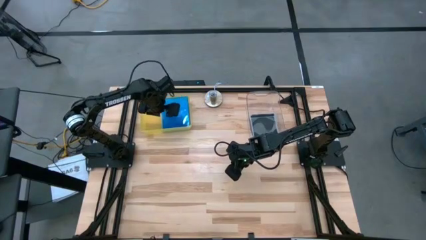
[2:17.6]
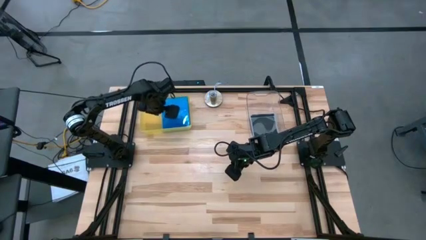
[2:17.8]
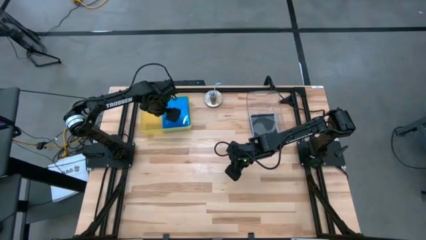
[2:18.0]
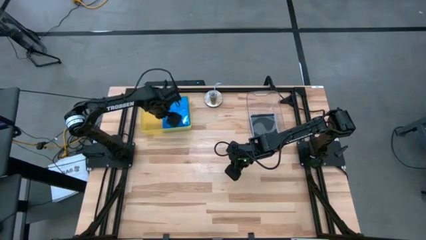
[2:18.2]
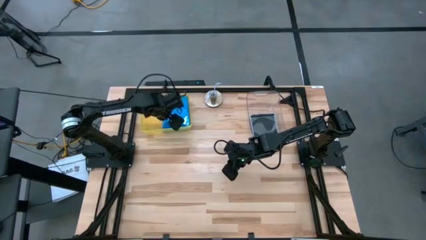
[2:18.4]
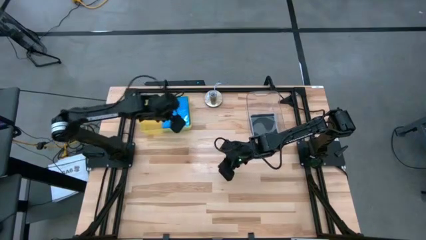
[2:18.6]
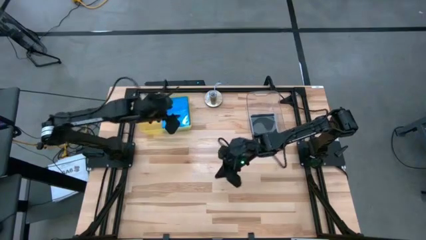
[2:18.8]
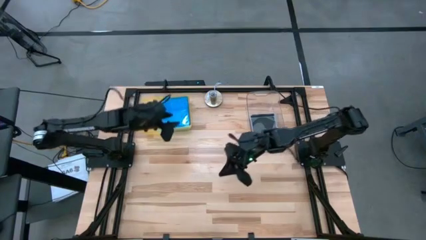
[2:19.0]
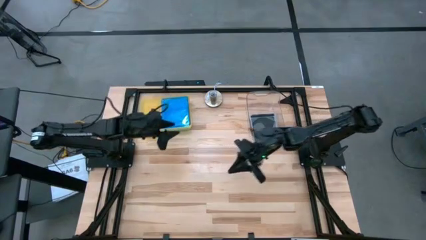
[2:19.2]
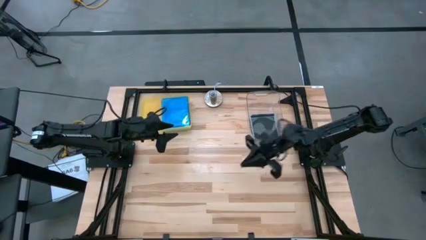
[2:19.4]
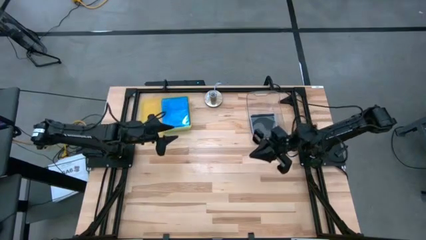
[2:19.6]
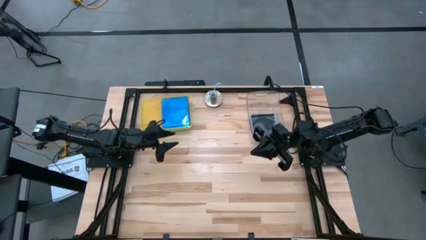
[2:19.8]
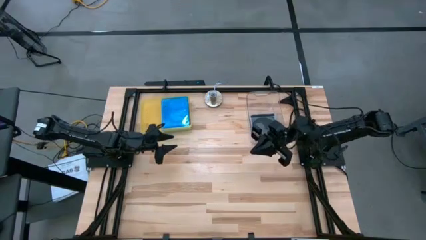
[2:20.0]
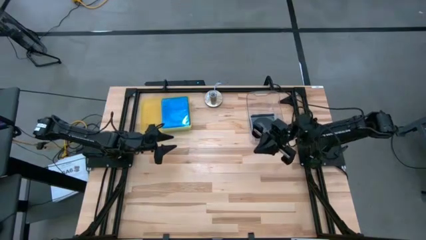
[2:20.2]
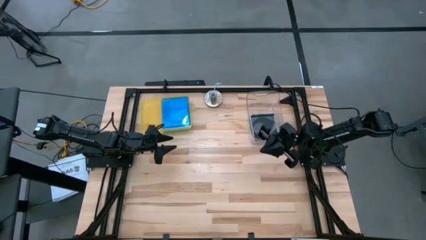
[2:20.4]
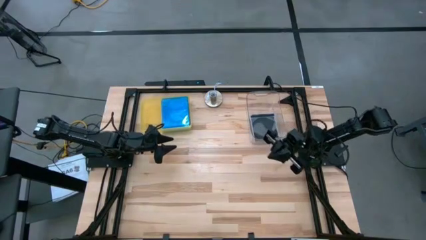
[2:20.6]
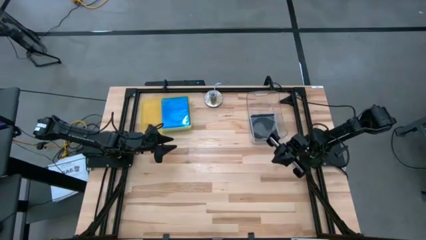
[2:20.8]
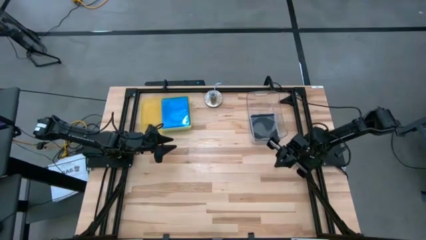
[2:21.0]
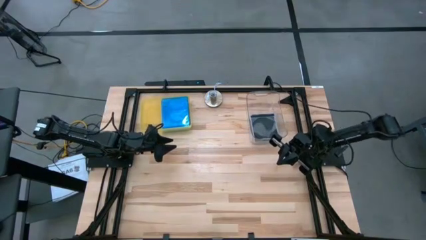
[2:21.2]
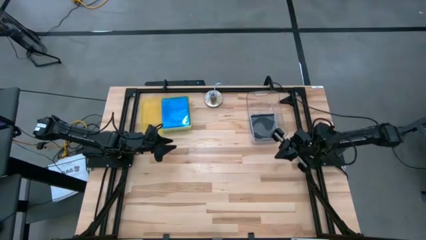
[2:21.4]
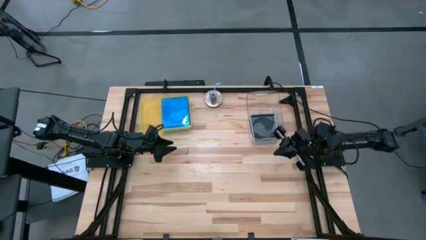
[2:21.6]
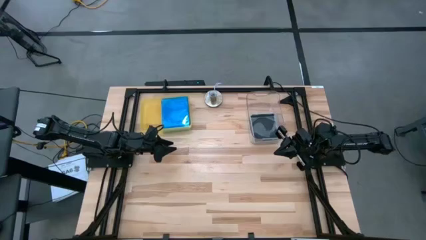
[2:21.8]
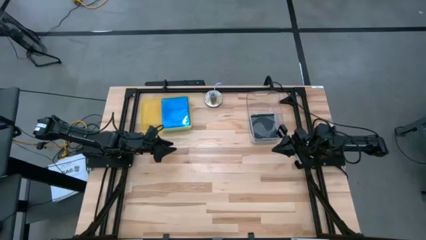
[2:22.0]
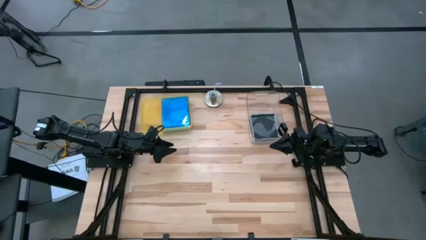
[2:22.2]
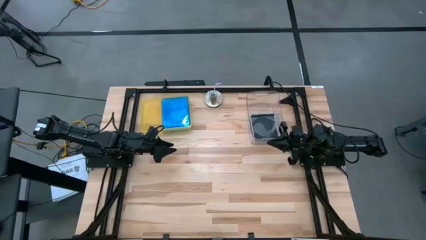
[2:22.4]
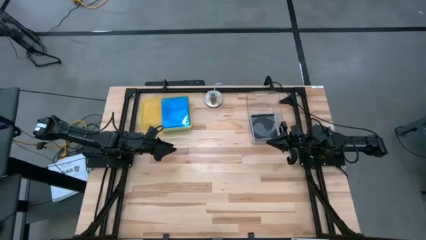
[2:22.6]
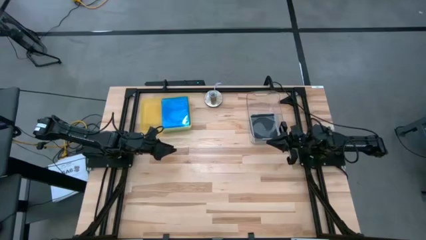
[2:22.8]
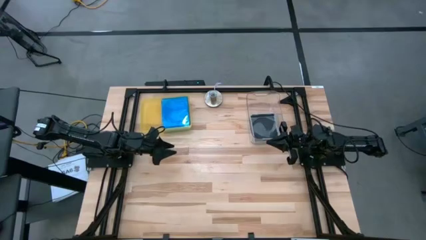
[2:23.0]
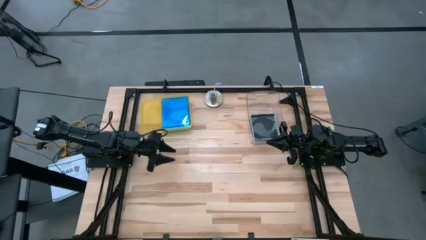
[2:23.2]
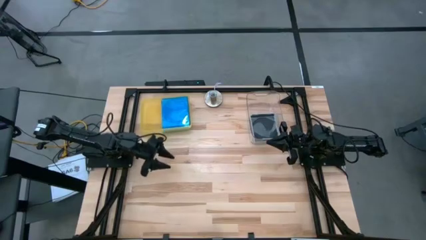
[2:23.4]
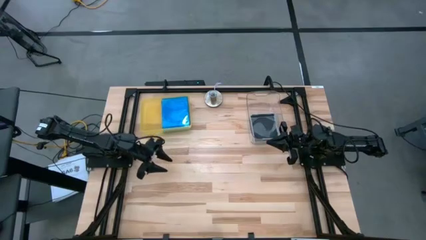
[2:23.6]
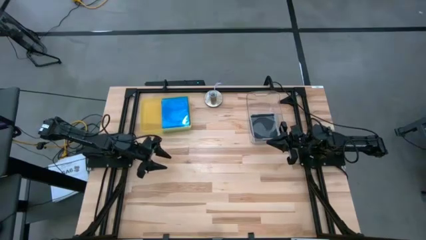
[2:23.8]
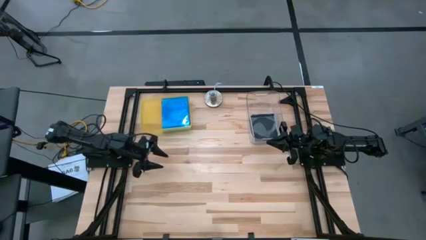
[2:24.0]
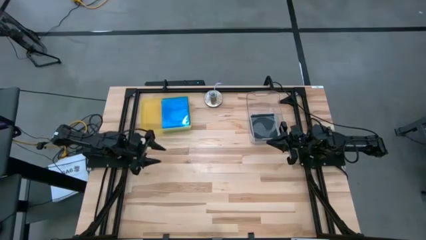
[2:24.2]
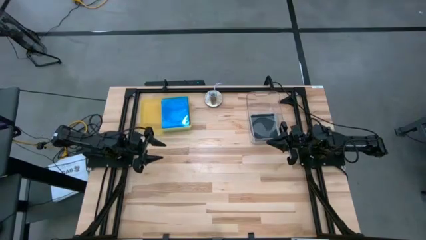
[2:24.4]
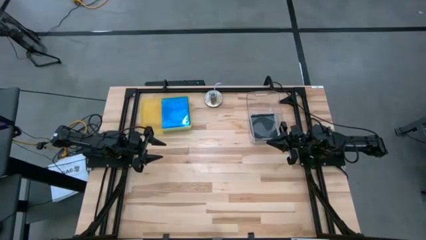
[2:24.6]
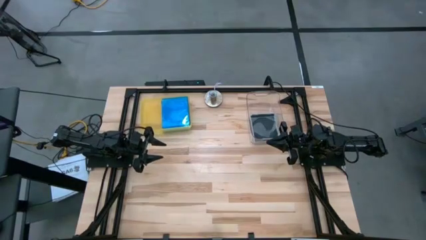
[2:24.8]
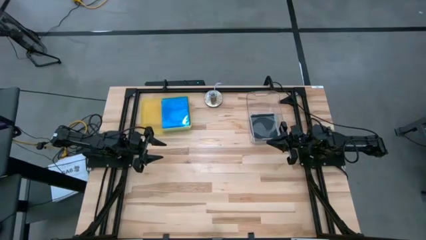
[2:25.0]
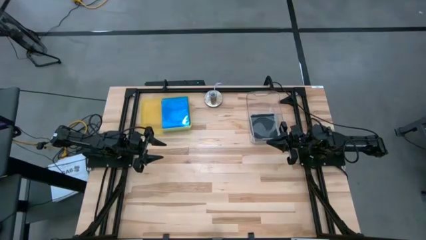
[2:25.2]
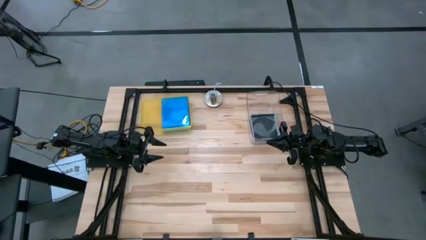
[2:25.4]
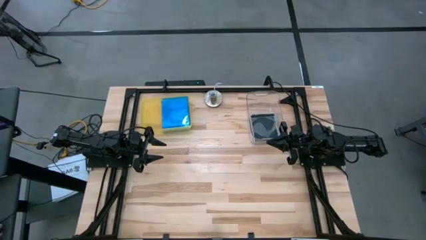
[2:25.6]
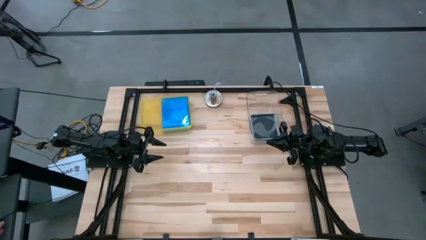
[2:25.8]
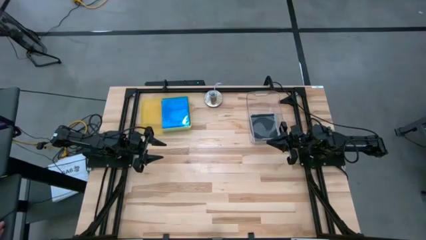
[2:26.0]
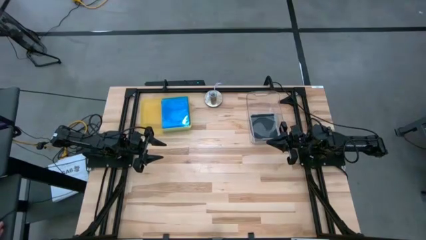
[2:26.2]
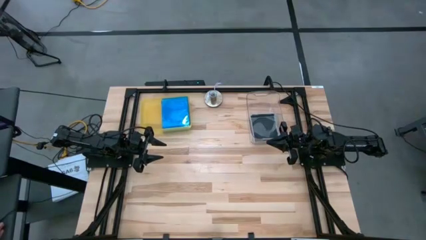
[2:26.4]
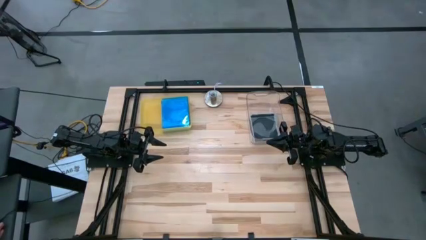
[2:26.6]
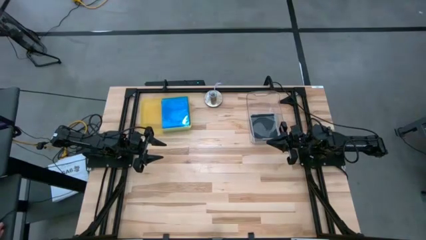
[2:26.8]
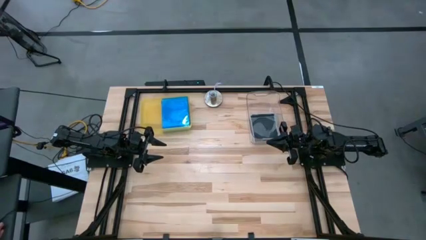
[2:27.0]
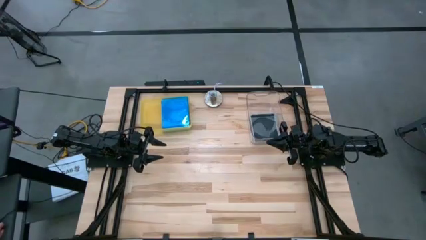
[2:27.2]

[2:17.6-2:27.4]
Task: Pick & place jewel cases by type
Return to Home Position

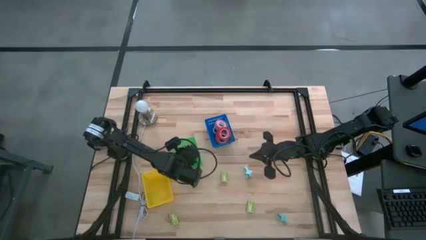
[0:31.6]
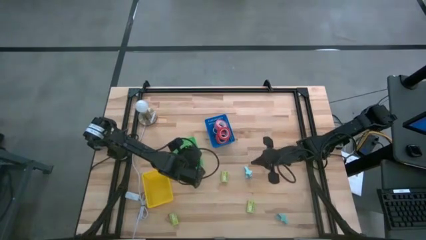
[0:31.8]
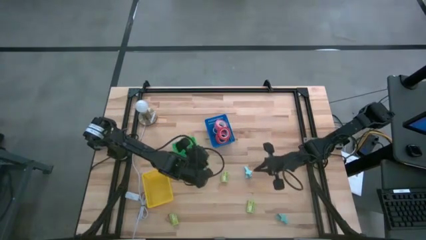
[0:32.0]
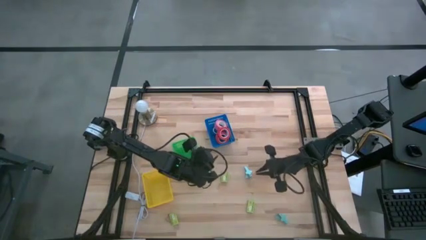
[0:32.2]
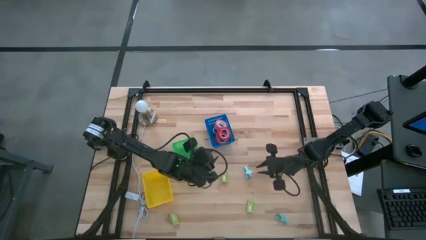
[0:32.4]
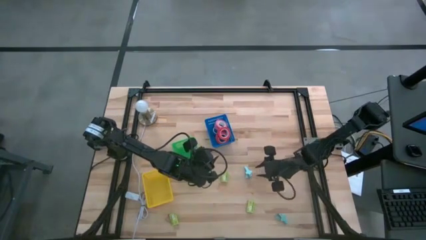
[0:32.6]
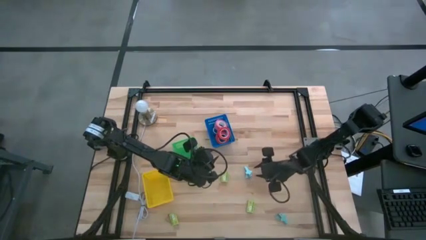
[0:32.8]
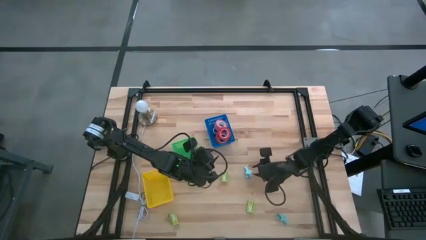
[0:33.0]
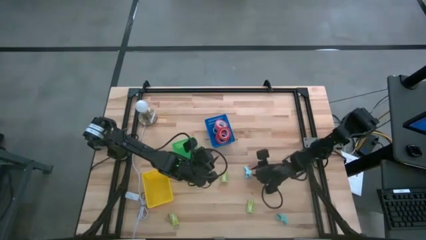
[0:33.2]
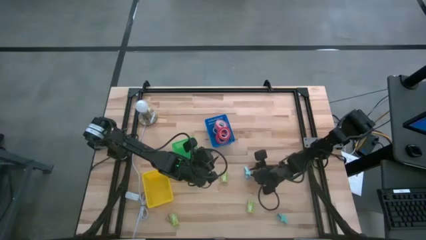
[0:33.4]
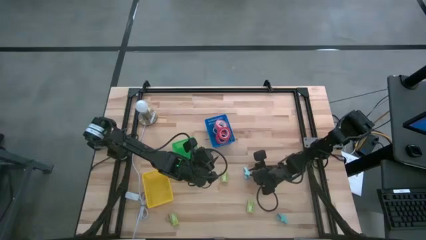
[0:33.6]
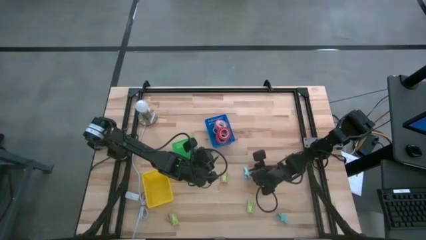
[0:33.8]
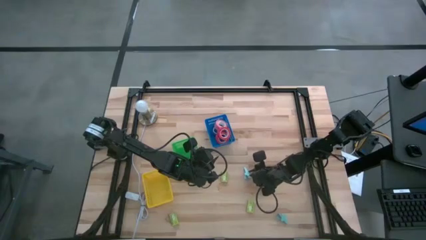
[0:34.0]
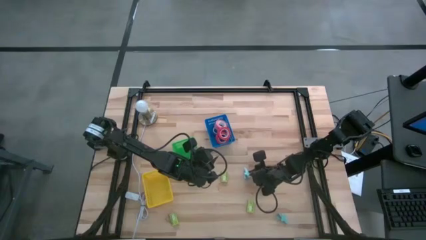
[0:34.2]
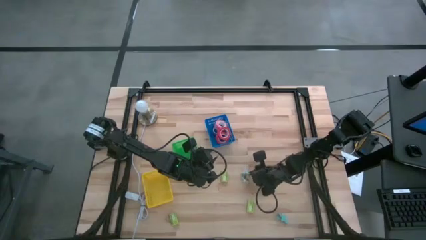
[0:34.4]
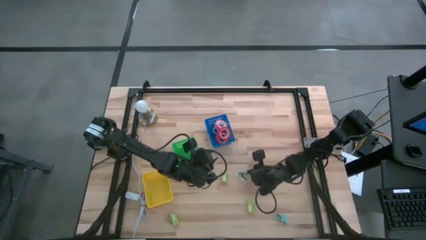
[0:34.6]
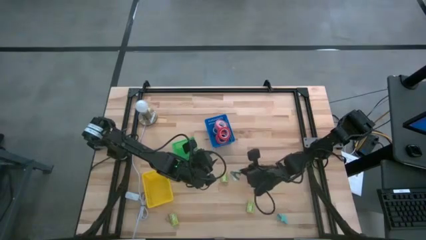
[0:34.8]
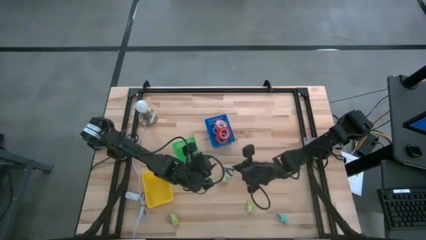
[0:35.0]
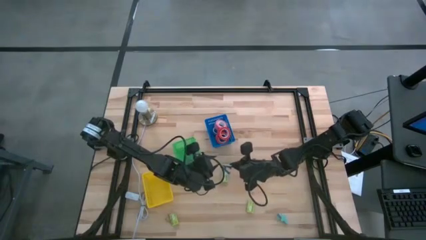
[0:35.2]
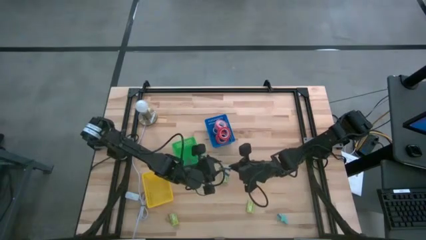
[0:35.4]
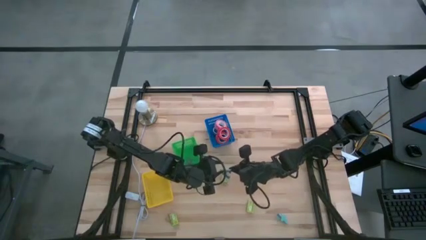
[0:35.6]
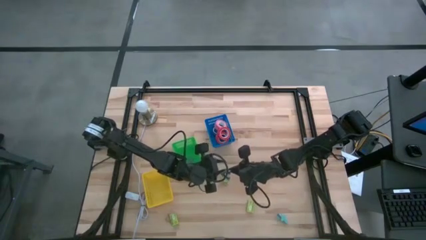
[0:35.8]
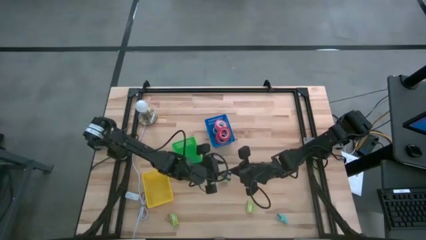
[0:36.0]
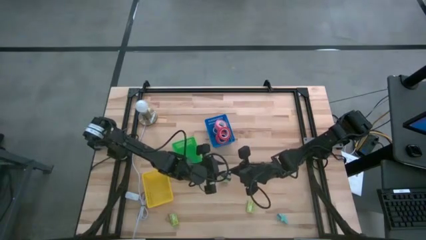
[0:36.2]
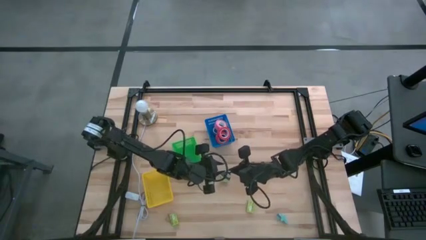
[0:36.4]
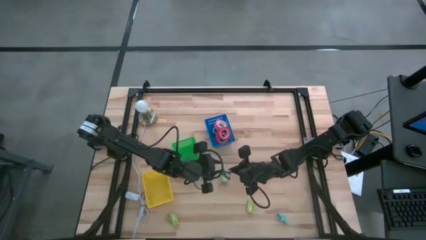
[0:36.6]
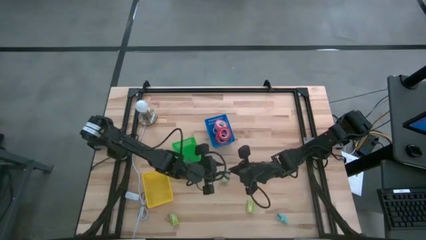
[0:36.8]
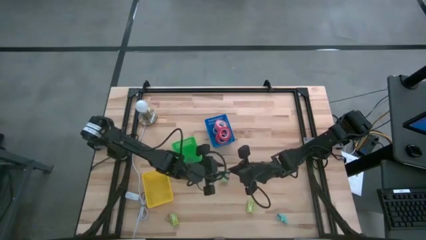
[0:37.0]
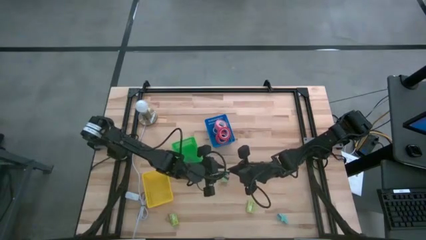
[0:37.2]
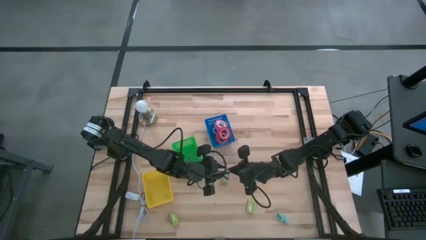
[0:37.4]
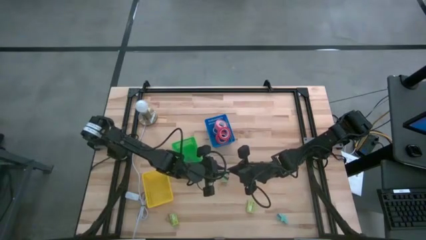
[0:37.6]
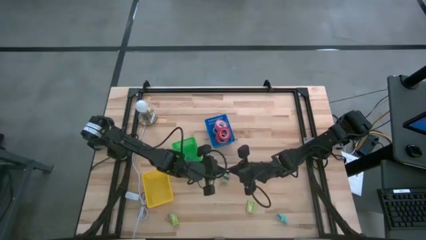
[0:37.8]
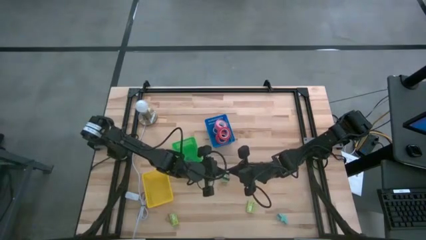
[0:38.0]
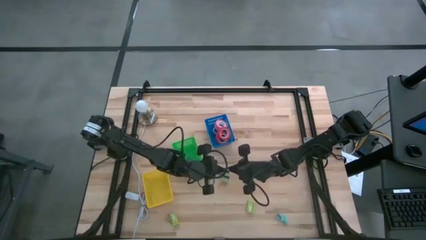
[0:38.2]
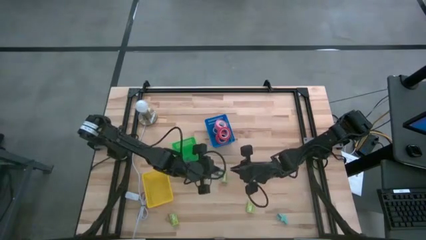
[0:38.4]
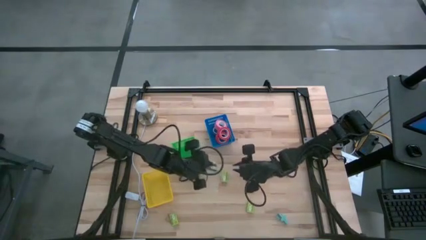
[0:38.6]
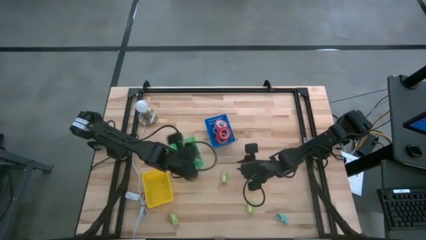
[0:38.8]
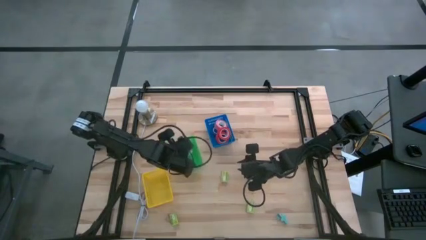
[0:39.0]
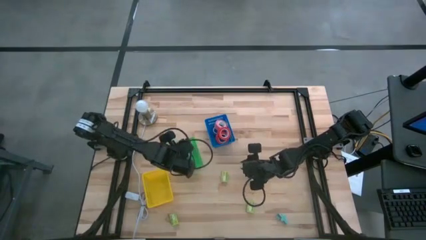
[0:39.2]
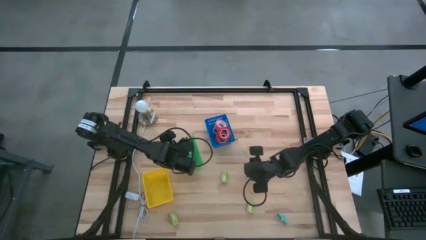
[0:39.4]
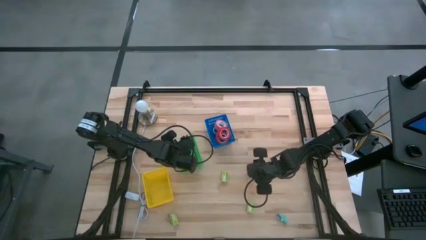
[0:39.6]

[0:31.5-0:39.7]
Task: Pick and place Stapler, Stapler remover, tape
Put the top light blue staple remover into the green basket
